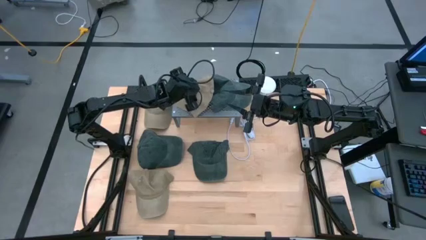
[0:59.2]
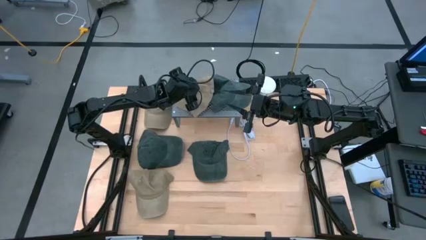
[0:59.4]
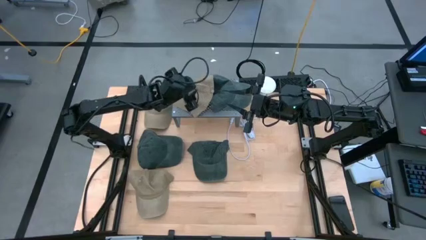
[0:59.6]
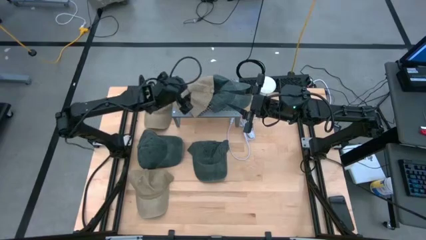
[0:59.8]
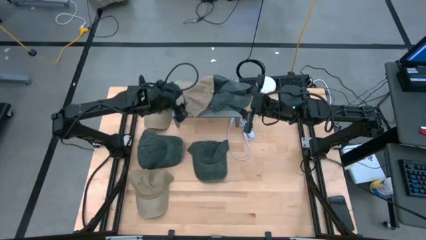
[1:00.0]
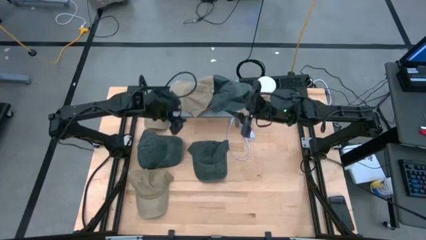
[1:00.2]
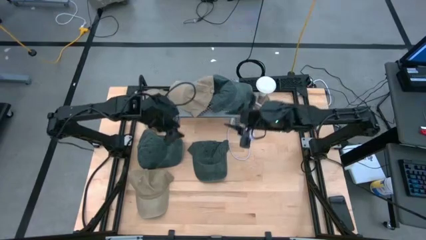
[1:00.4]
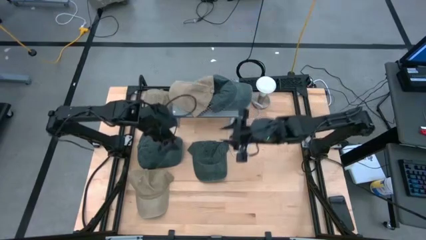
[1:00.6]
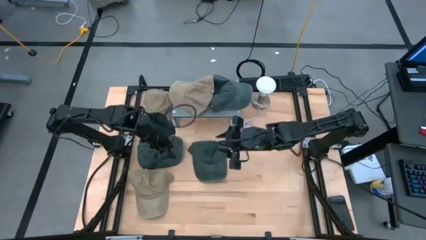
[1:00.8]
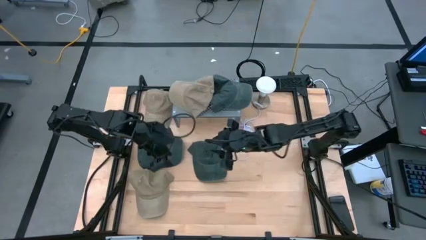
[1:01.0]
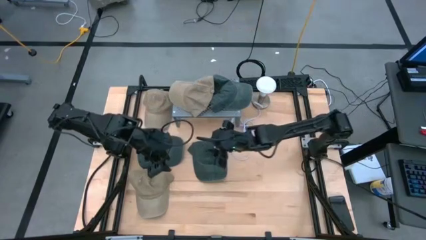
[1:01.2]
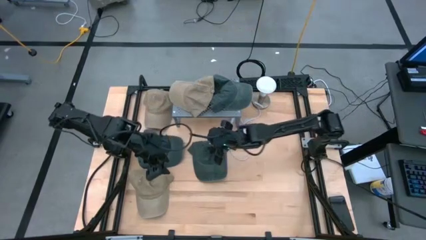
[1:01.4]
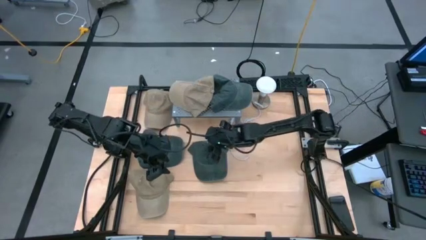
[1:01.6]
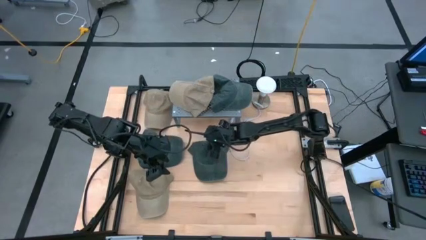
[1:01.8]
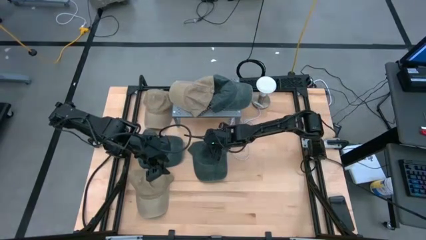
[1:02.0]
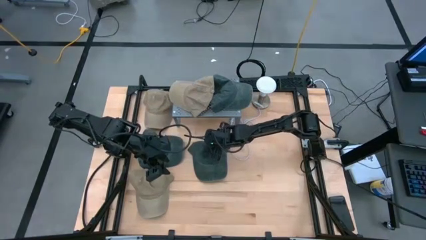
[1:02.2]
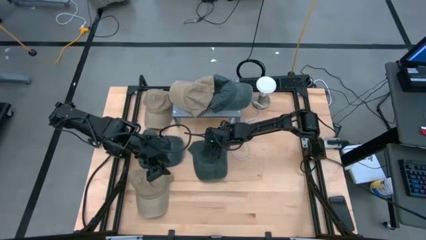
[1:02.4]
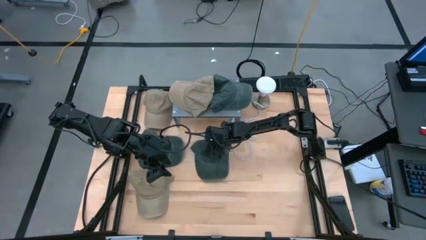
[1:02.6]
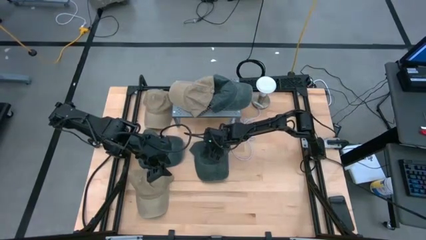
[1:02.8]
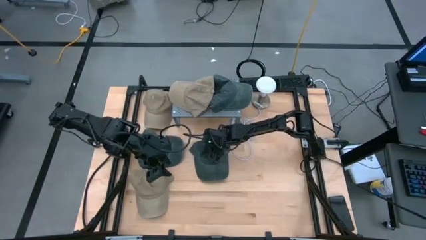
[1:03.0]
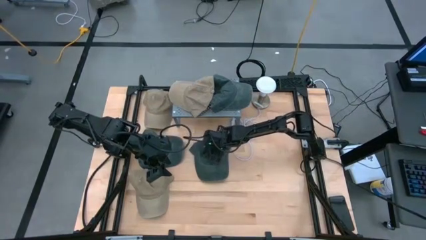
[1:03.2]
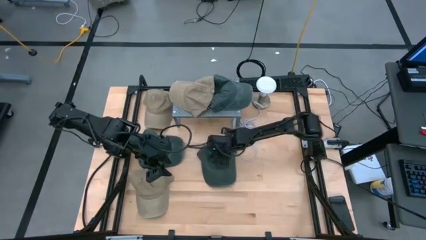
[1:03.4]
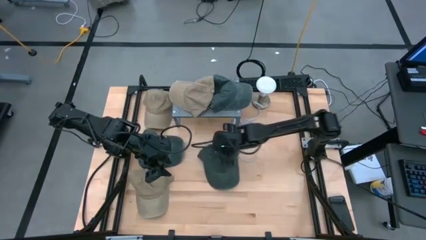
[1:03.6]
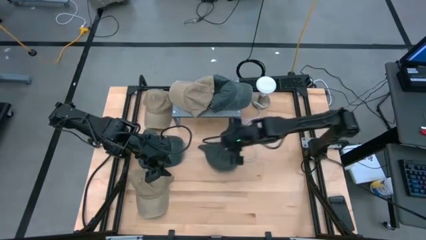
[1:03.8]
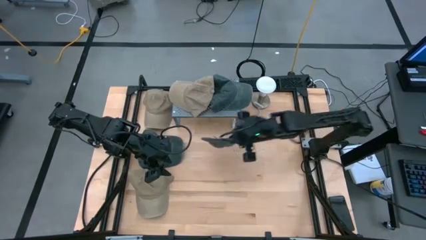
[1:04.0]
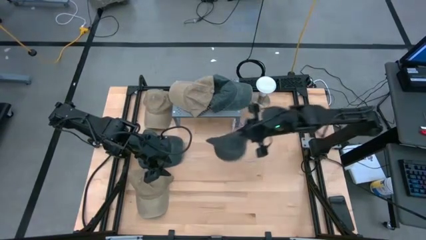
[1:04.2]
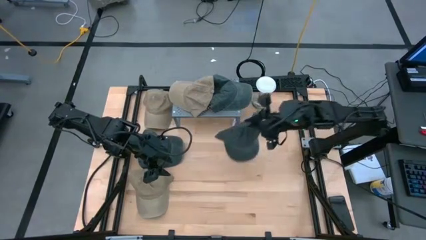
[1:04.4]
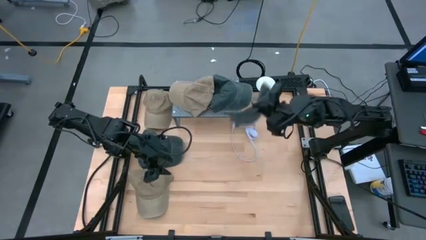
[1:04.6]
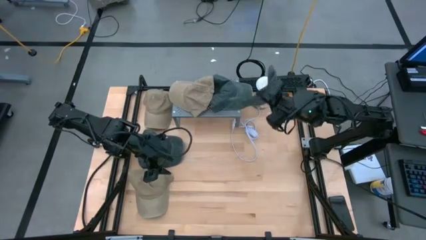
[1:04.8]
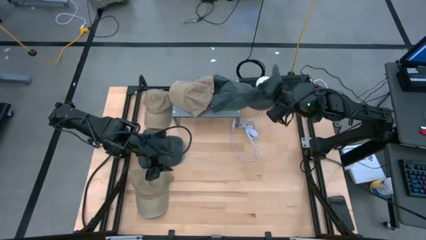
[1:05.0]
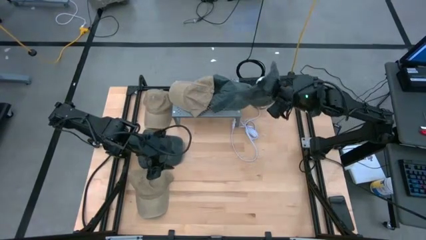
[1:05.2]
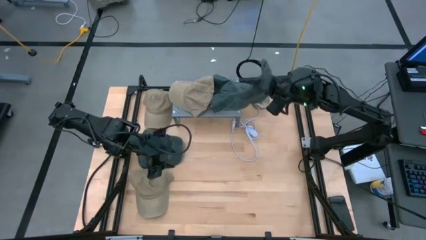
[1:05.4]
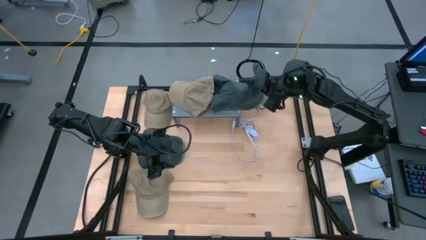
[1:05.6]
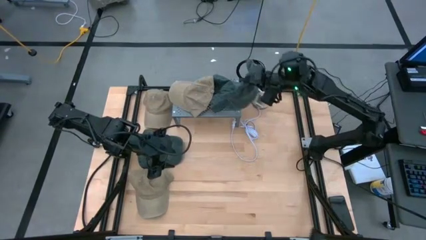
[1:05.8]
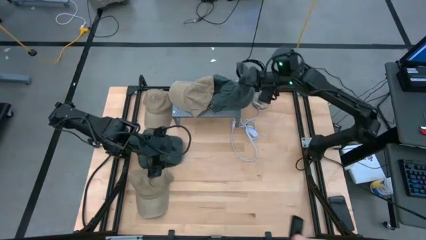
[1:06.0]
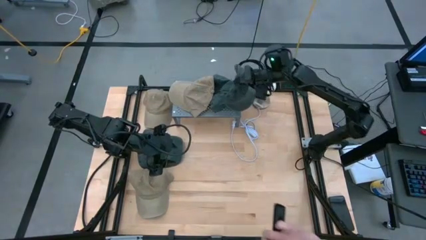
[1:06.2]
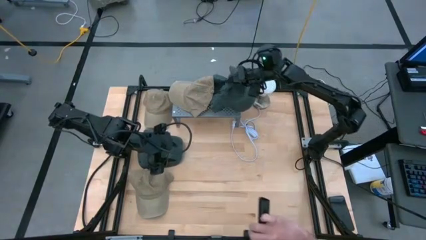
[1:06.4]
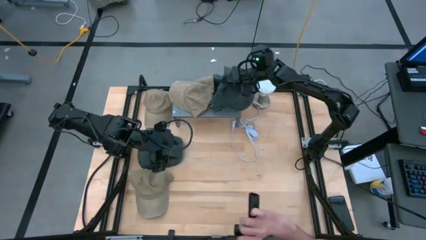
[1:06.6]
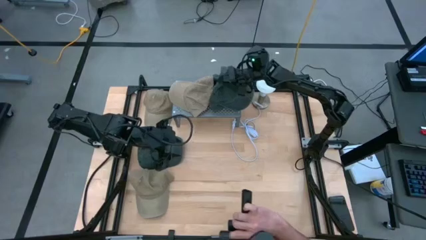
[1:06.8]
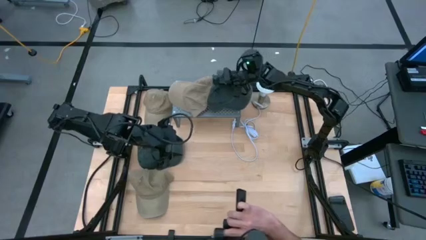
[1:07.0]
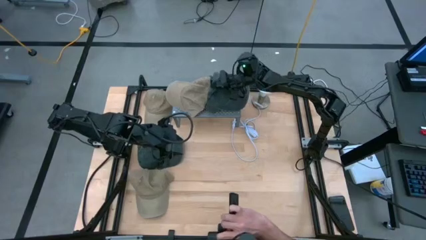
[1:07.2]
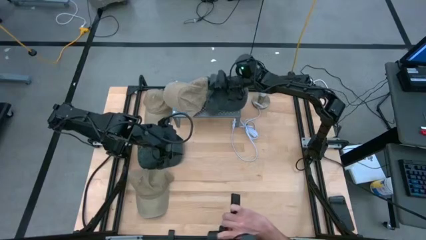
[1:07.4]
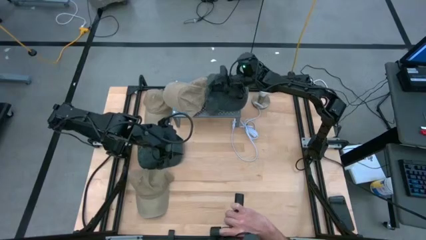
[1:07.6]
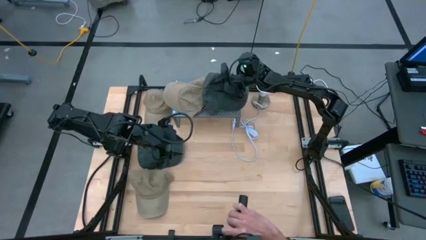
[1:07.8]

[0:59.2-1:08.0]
Task: Pick & Place hat
Stack the right gray cap on the gray cap on the shelf

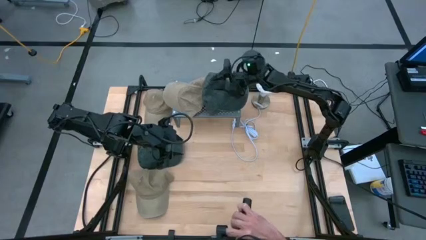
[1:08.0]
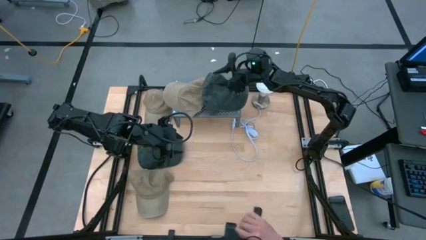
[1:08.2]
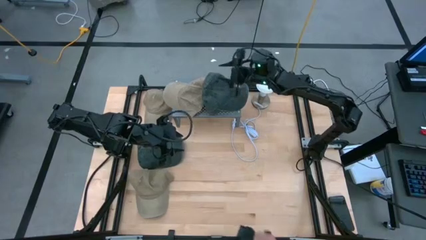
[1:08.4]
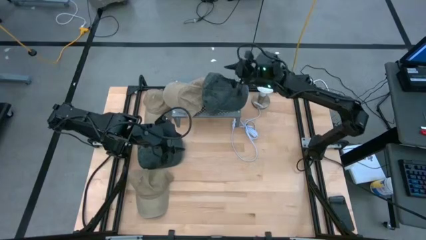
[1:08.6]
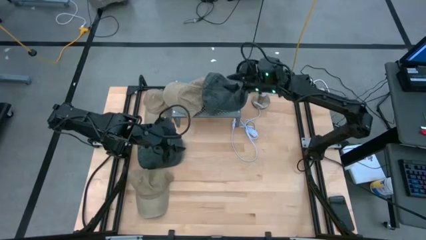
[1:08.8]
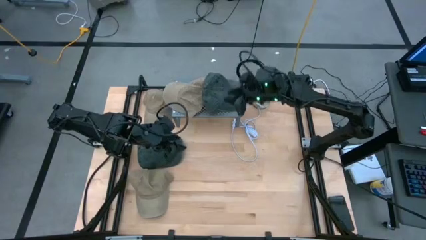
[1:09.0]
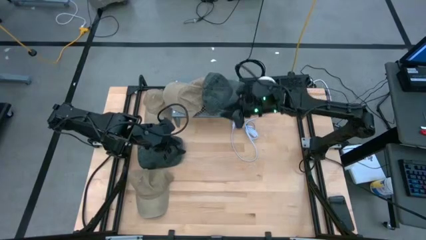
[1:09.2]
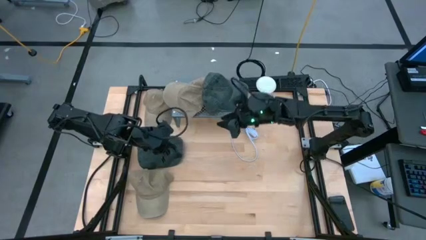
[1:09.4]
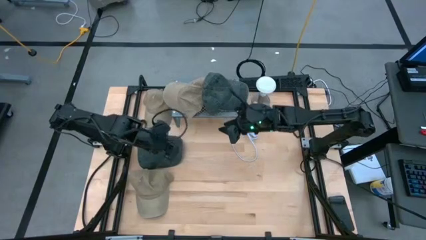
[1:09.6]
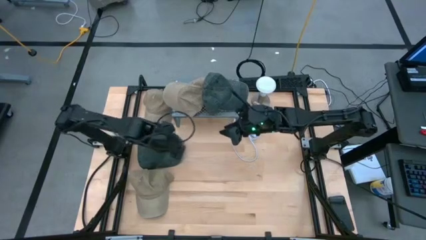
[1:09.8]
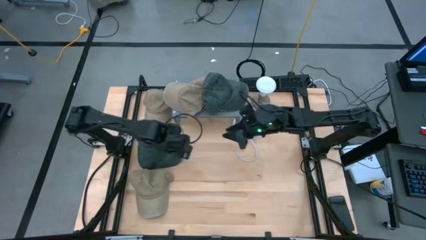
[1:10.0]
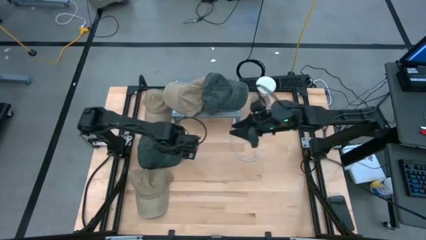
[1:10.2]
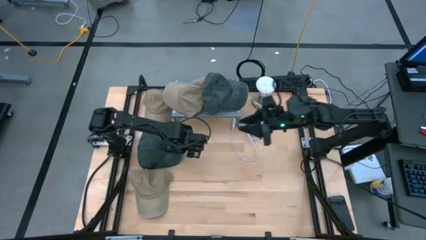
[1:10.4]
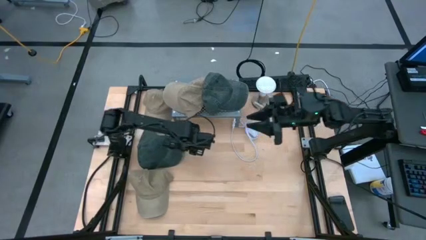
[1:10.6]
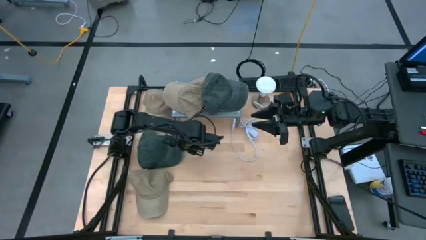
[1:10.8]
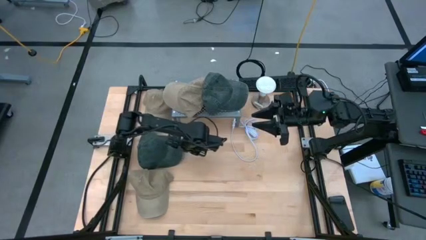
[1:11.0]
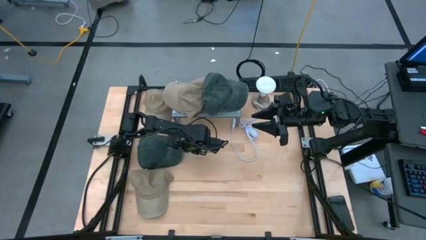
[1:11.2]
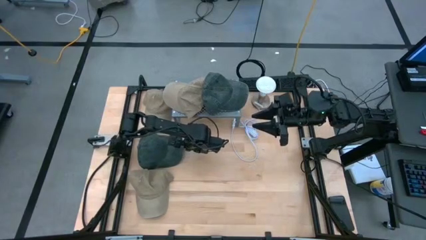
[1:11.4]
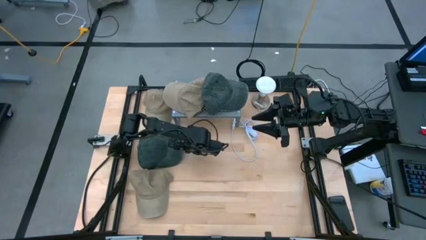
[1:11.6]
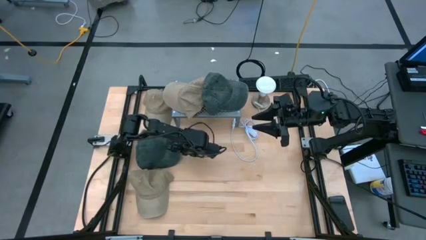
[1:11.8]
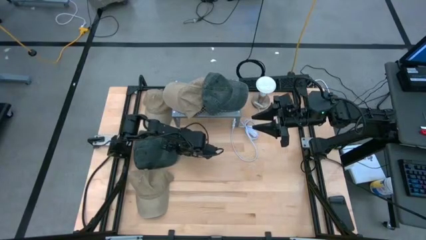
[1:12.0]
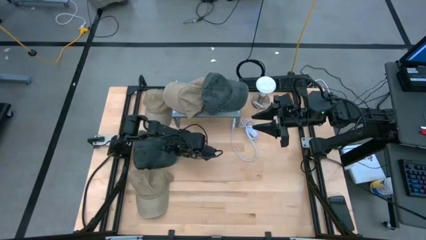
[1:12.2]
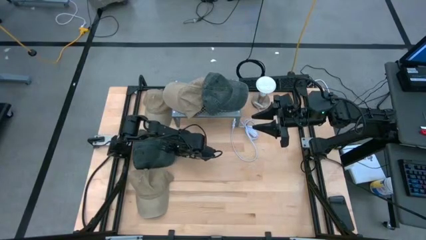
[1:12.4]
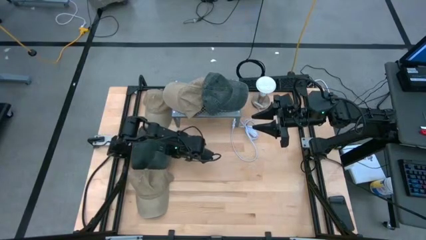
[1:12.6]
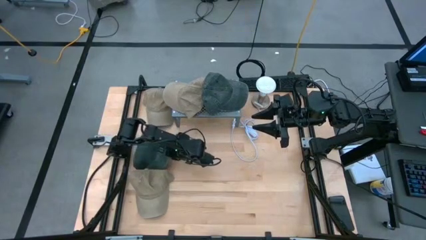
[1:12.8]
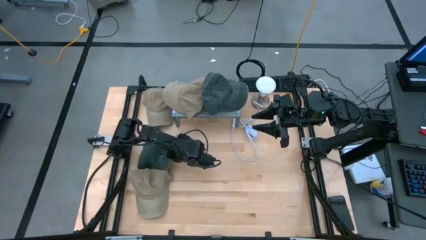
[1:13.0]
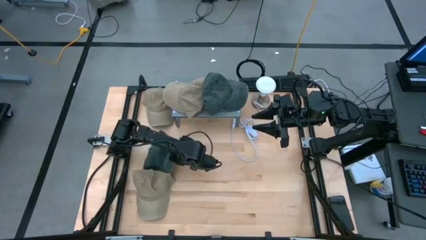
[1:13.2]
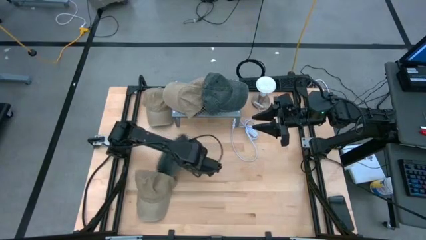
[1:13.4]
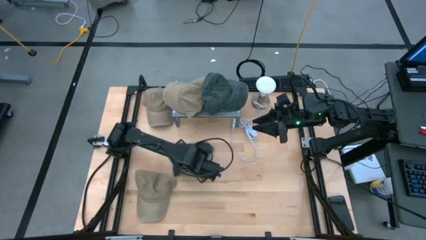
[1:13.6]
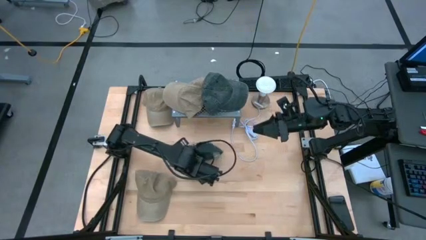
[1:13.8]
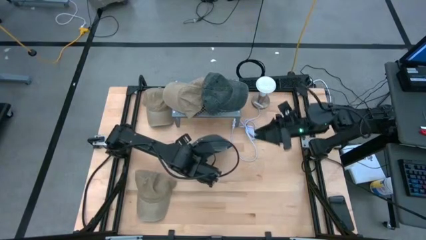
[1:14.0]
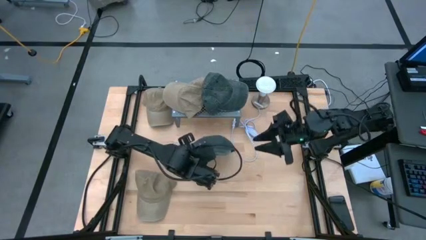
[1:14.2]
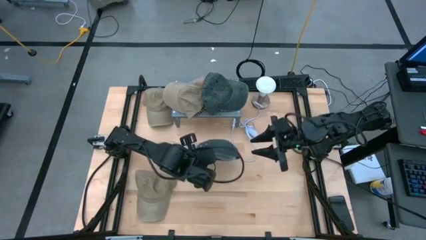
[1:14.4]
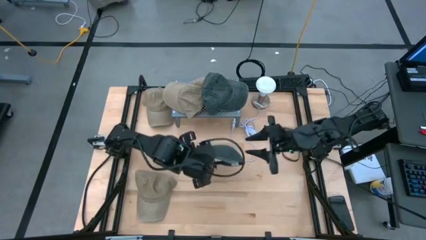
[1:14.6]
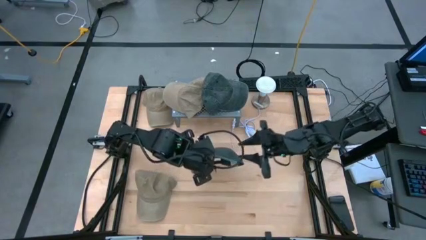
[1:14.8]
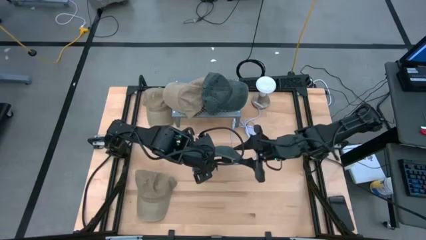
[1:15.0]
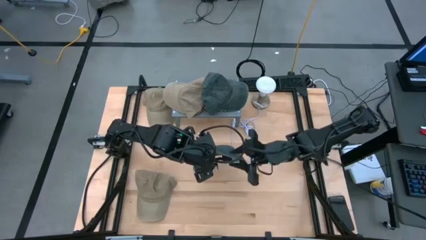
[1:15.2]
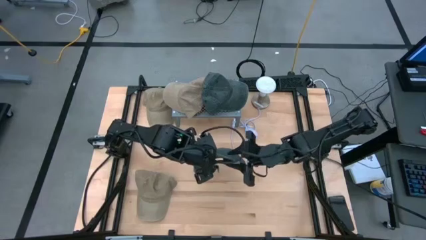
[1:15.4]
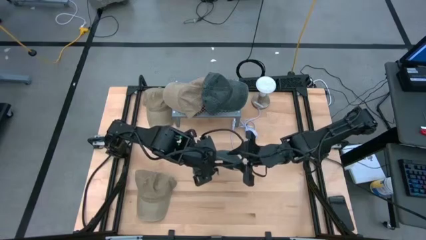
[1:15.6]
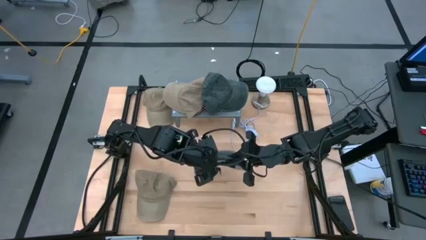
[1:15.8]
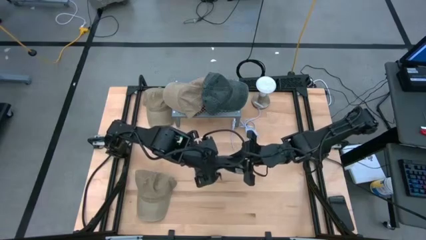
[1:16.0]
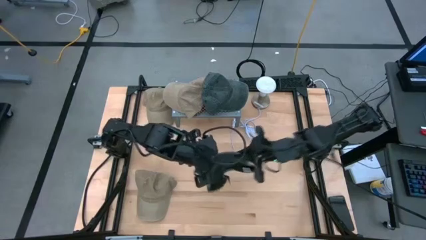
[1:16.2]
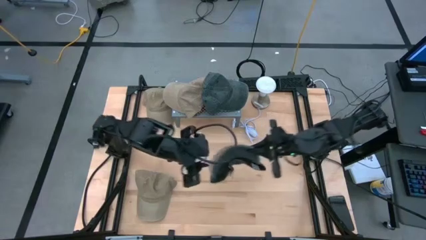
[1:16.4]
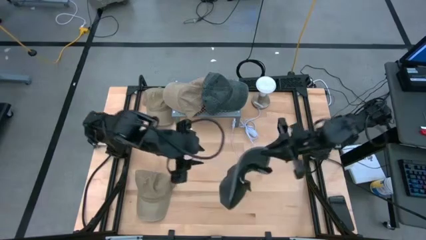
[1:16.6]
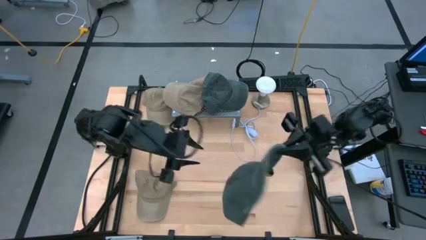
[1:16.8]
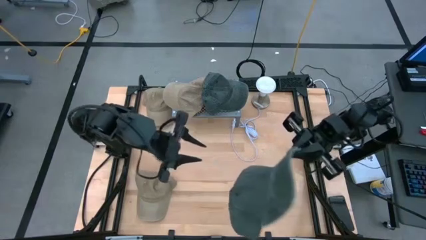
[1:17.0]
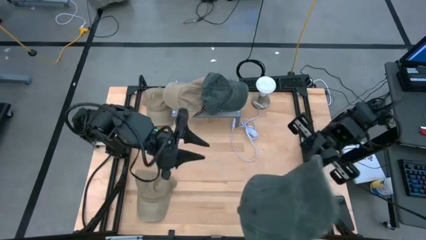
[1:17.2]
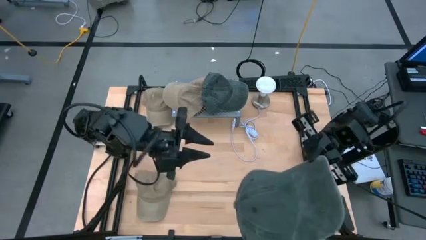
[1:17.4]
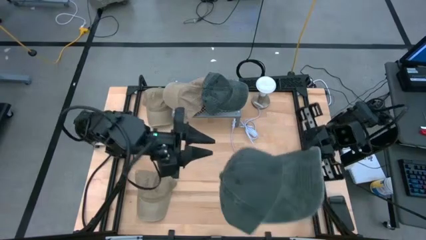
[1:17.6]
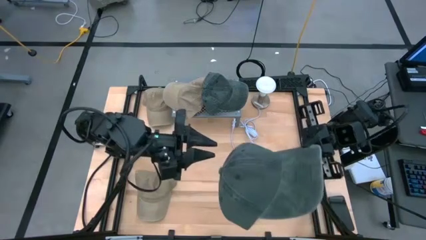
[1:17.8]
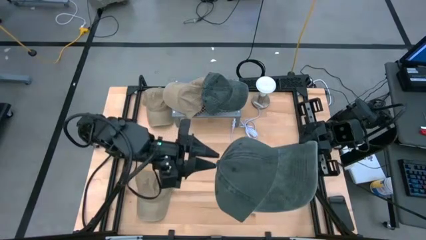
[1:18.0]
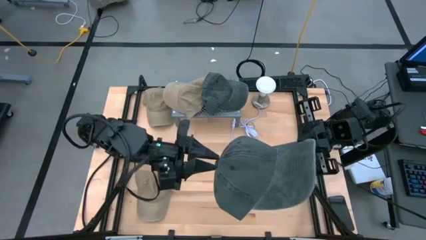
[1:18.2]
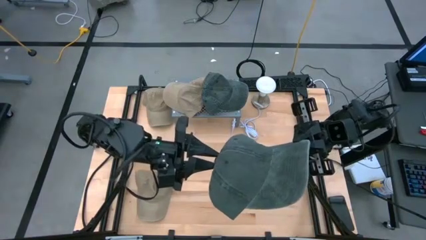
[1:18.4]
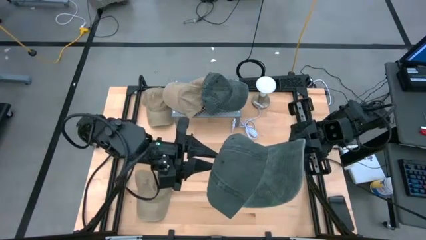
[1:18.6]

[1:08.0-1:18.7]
Stack the gray cap on the gray caps on the shelf
